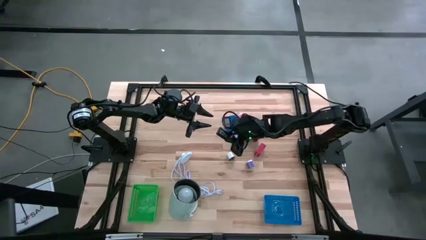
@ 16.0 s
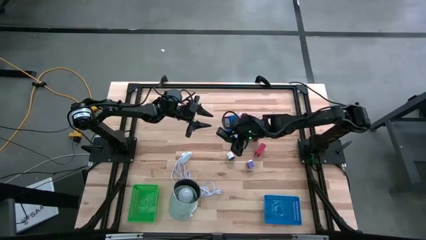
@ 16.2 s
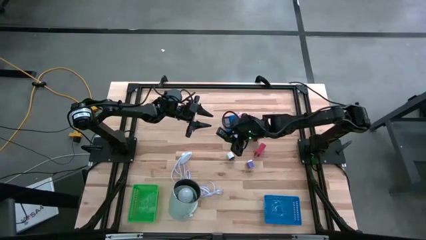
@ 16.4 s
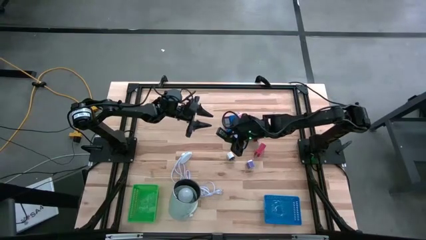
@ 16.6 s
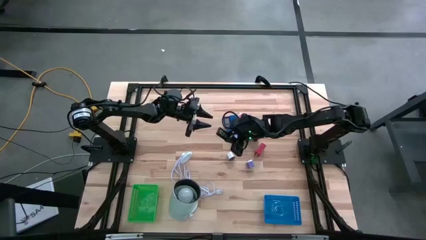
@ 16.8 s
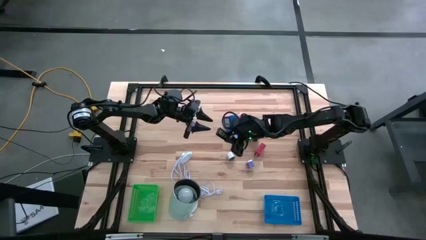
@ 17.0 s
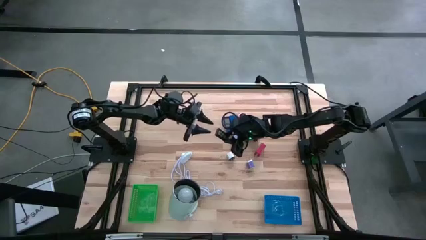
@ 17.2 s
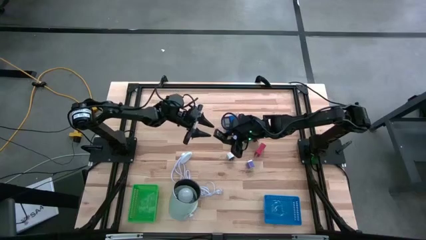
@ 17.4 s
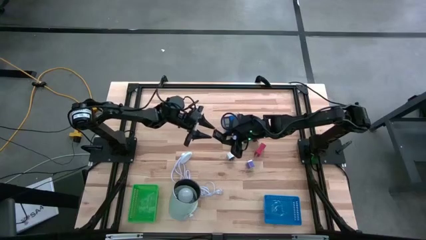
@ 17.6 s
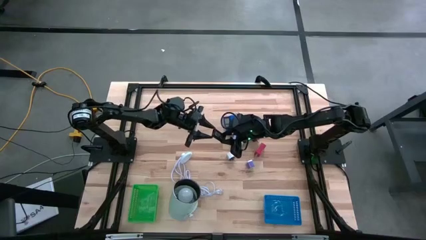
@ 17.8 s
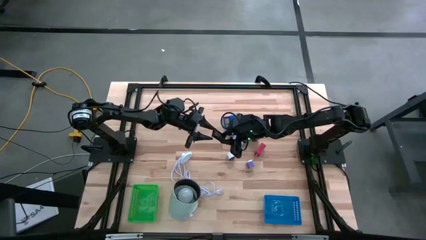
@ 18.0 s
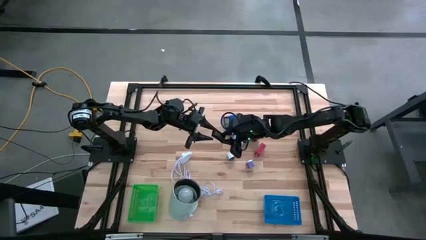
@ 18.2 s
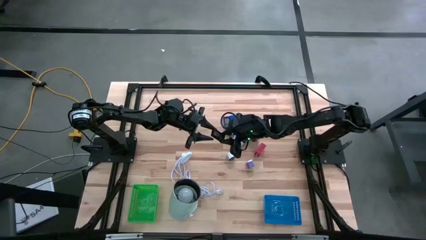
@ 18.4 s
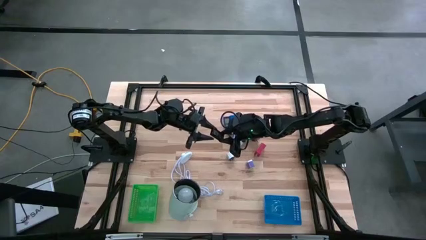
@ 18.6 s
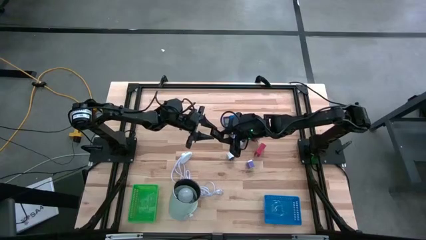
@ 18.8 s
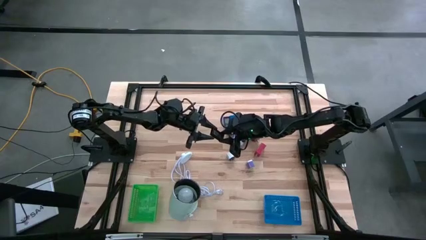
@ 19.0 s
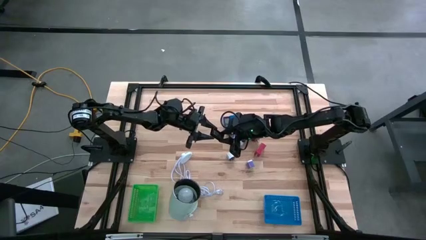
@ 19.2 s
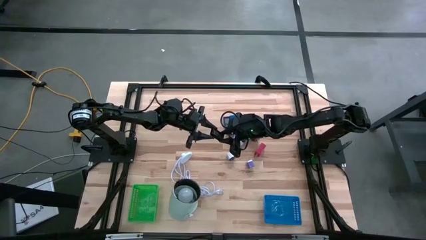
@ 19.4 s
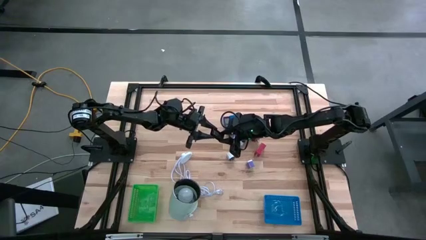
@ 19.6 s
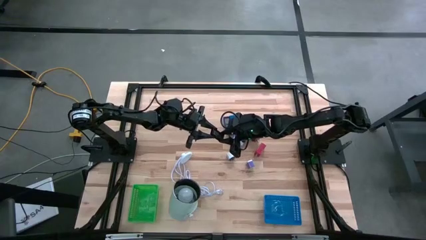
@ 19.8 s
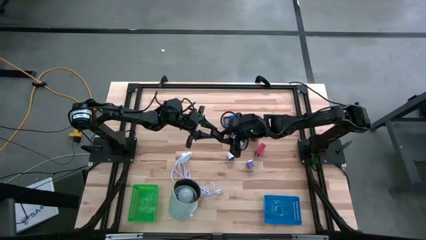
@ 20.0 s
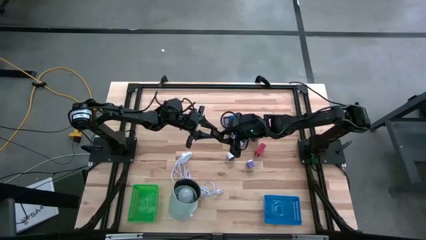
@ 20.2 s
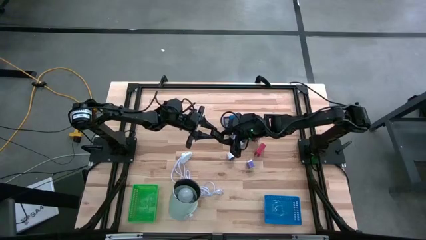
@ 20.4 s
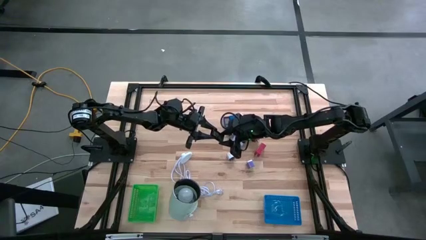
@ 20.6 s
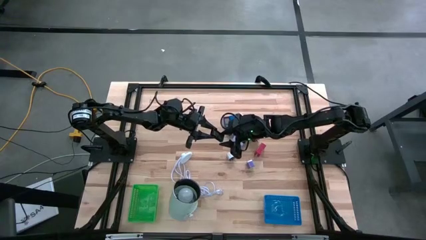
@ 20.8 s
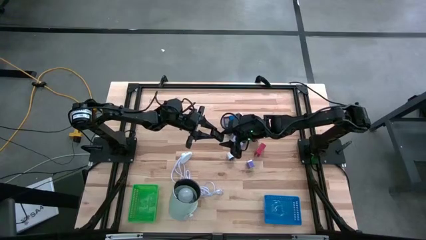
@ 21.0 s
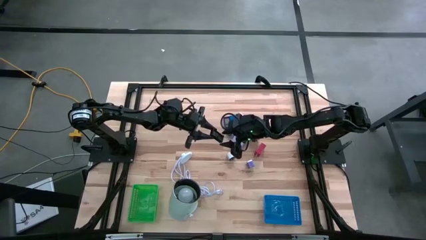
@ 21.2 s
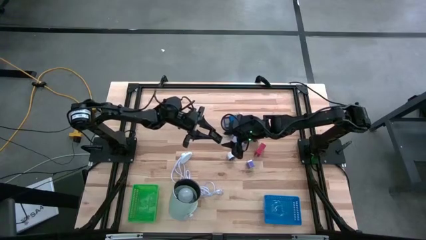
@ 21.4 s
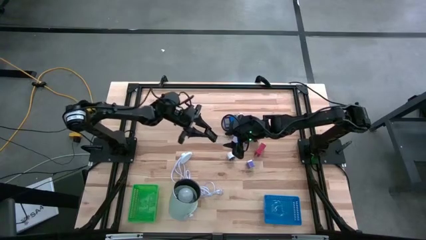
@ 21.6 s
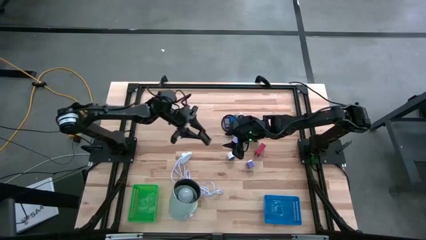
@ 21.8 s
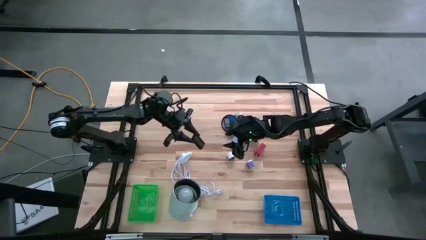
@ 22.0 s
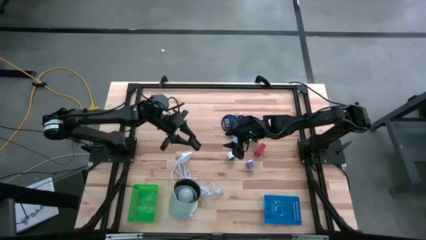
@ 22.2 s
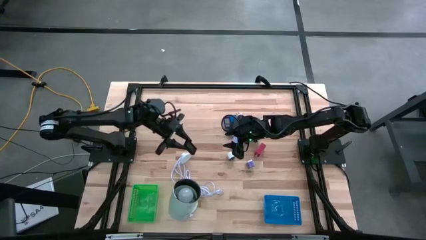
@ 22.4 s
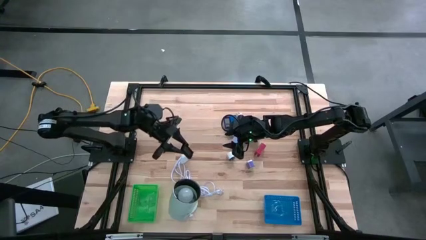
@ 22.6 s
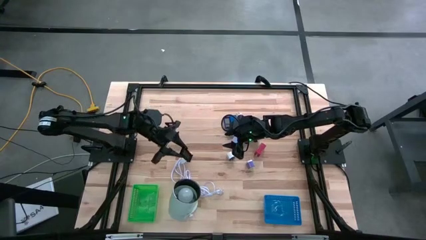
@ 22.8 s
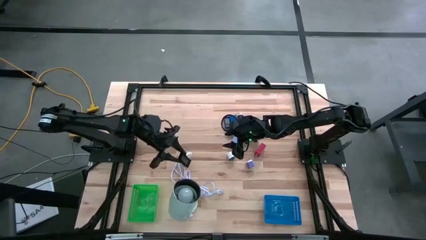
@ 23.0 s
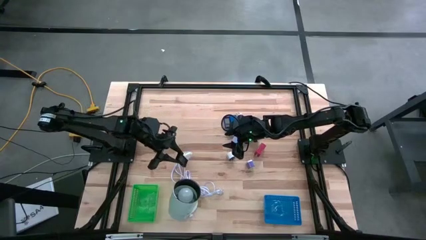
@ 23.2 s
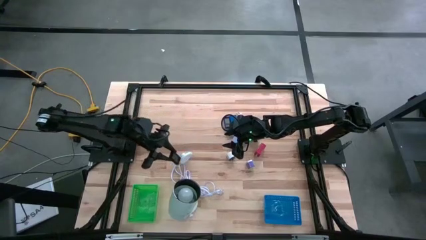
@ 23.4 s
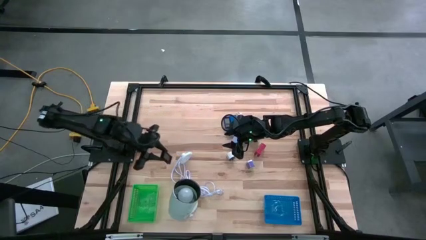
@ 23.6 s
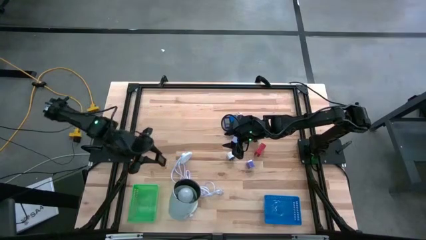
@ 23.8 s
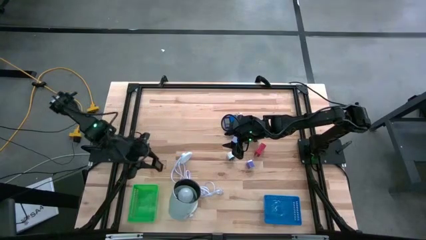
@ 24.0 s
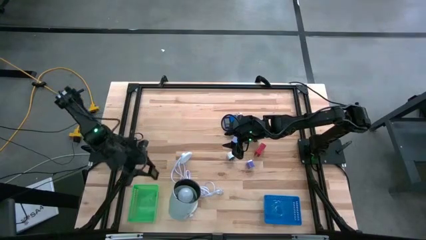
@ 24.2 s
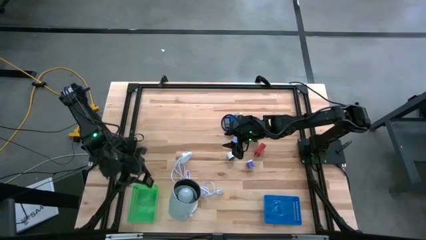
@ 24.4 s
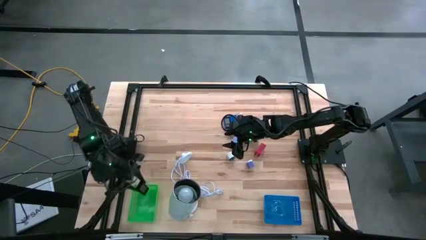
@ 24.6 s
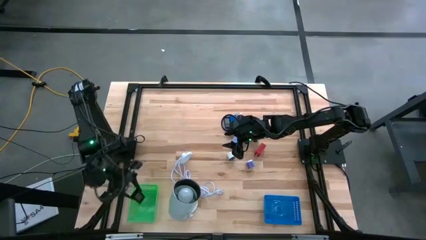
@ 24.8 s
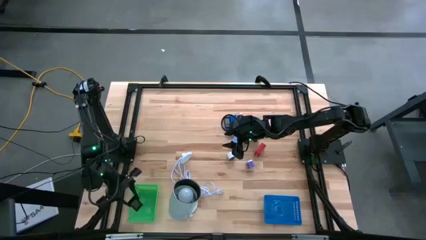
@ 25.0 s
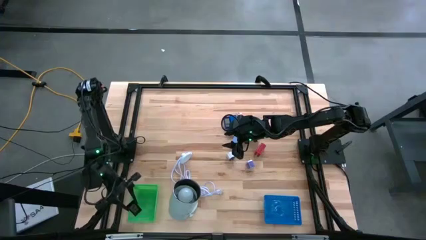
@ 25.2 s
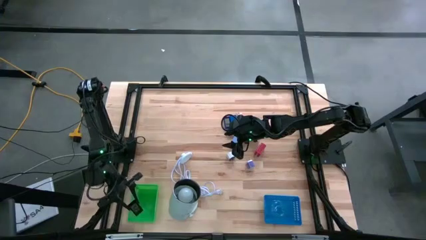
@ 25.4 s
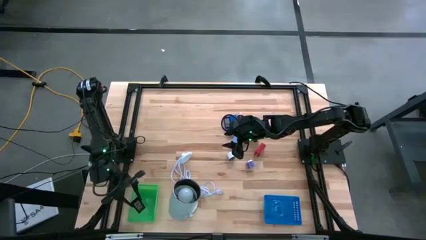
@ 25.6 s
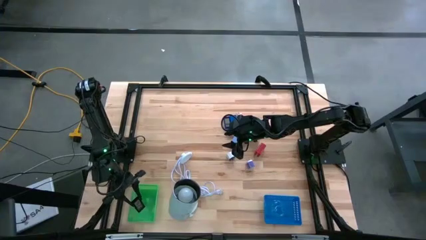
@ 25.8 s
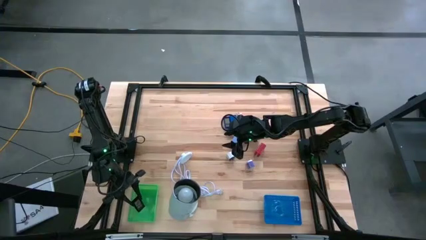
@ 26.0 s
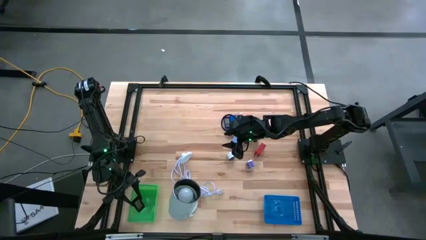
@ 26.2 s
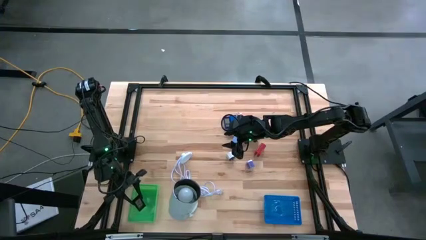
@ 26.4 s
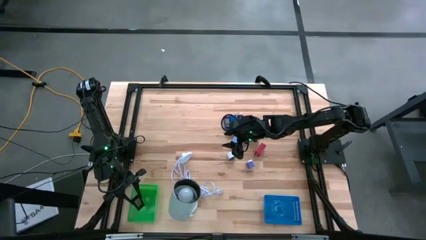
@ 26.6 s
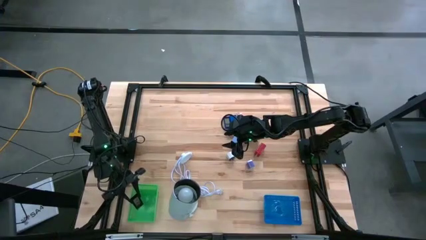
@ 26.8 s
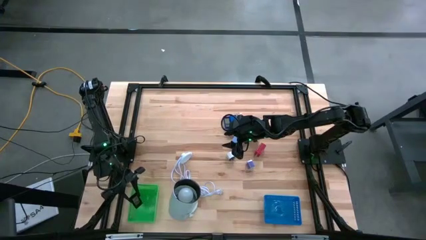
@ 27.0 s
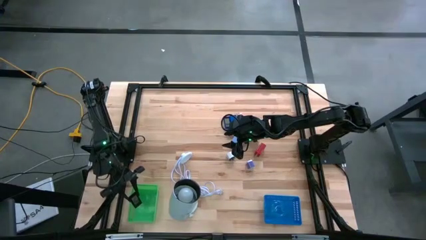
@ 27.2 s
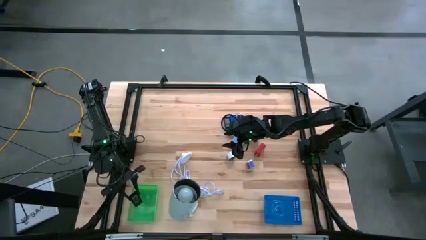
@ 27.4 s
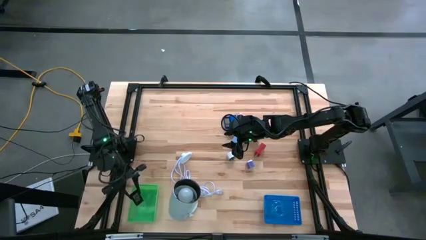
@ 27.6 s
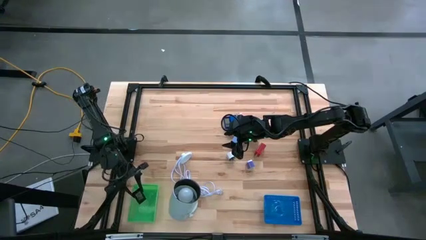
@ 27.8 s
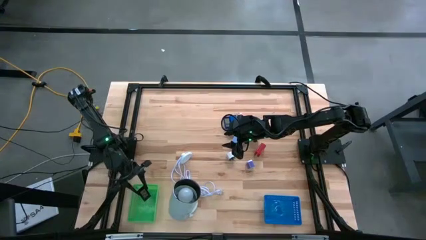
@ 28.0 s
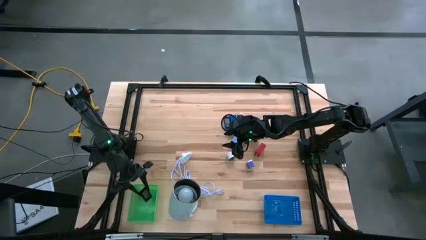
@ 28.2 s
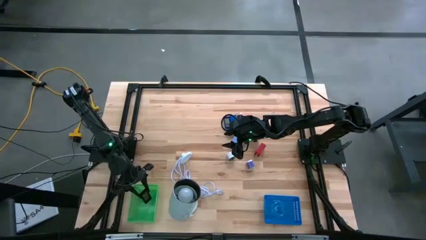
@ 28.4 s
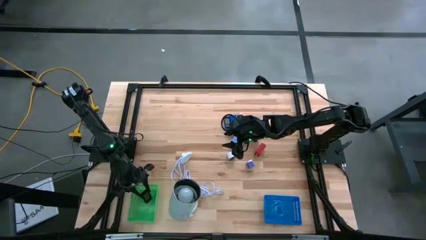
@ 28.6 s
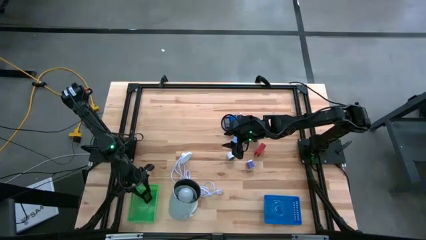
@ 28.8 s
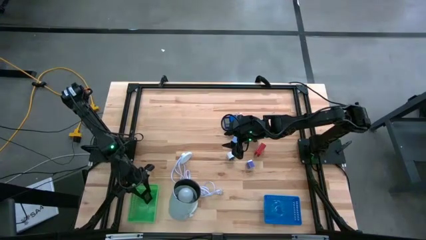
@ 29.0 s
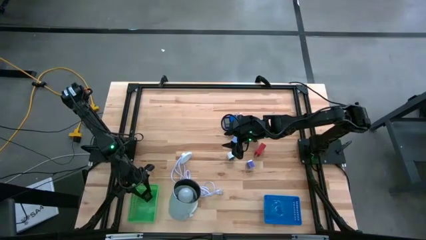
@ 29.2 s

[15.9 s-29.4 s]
Task: Pick & Place Office items
Put the black digital timer into the green basket
